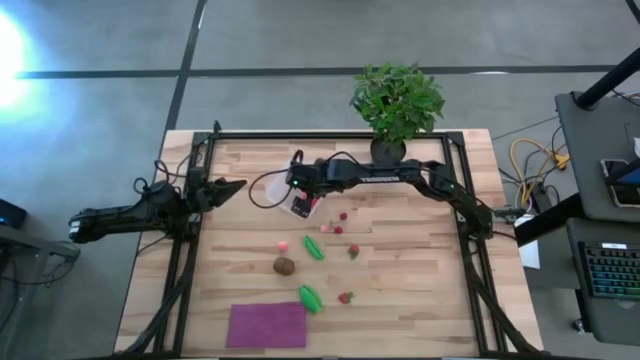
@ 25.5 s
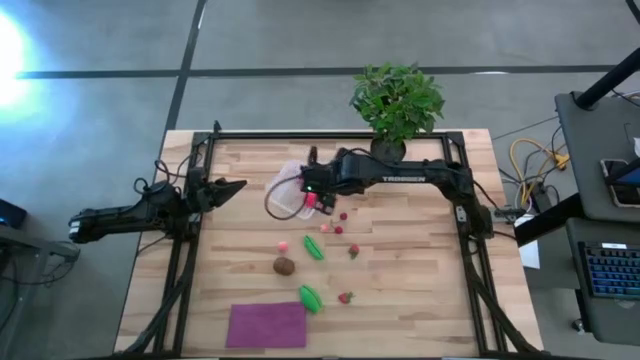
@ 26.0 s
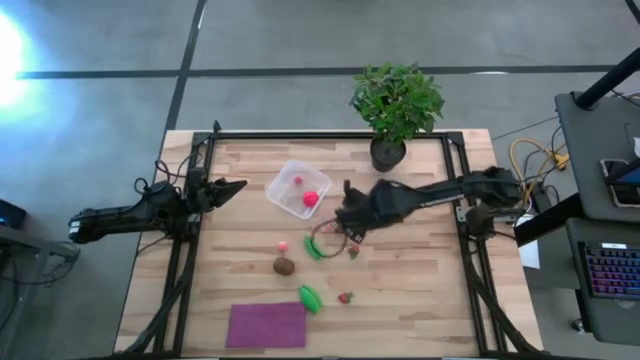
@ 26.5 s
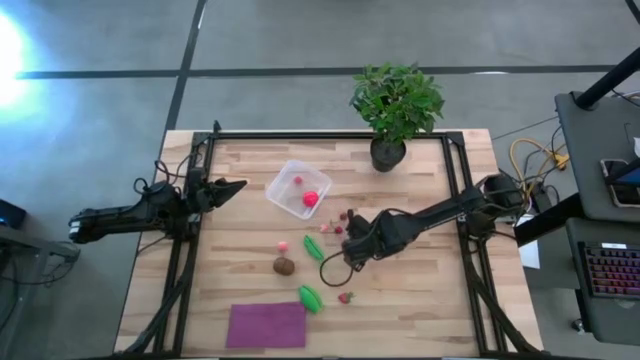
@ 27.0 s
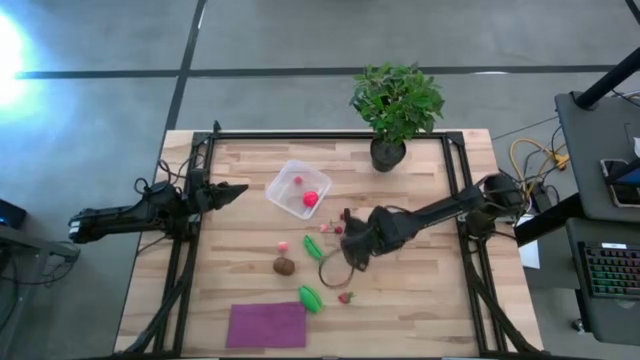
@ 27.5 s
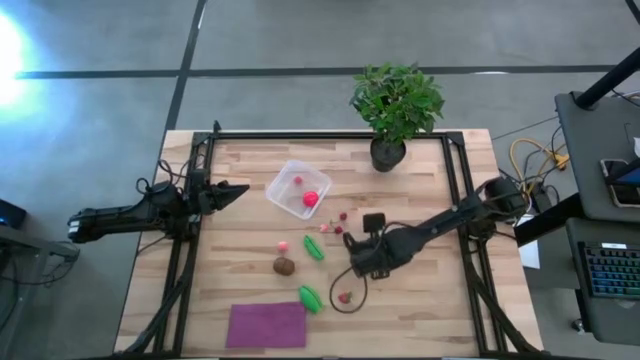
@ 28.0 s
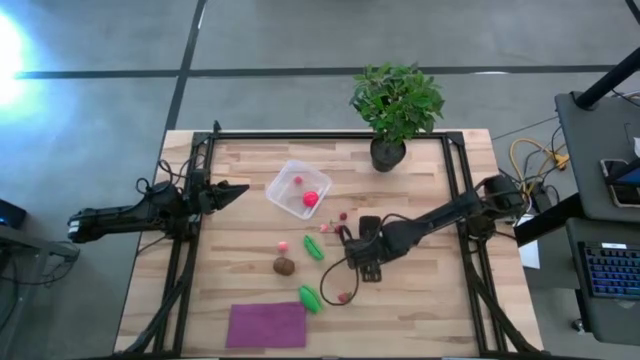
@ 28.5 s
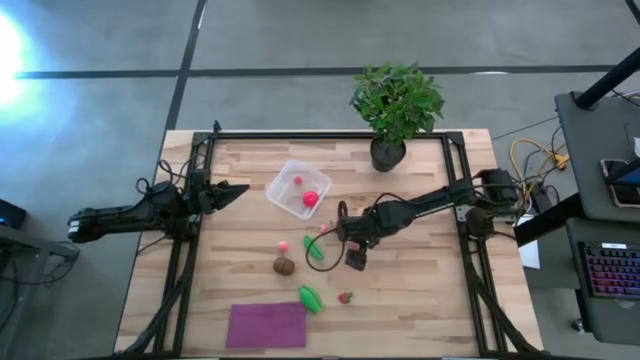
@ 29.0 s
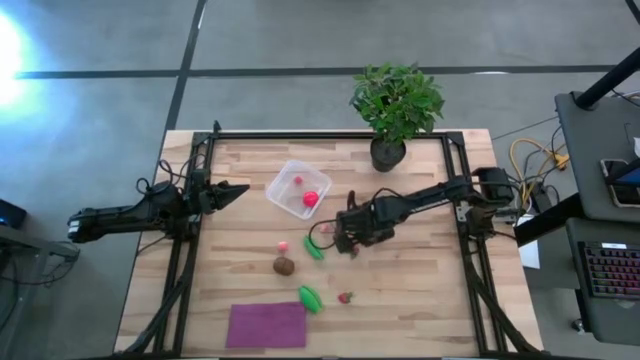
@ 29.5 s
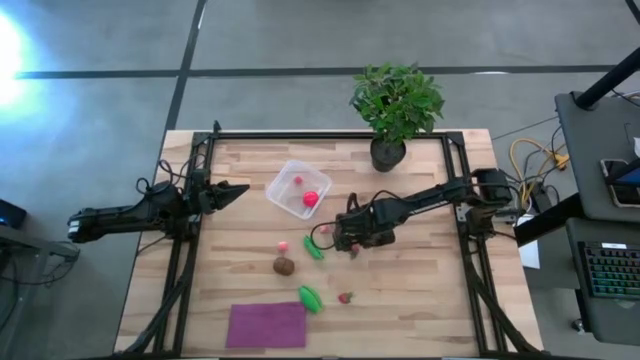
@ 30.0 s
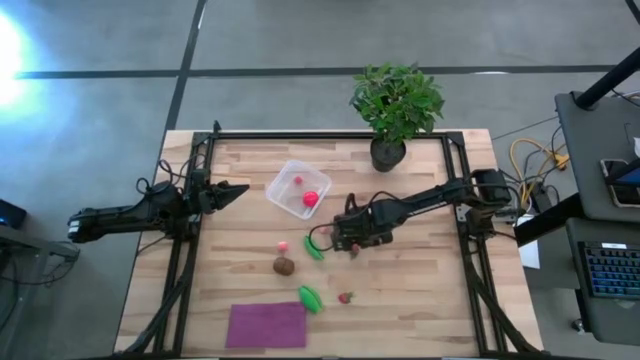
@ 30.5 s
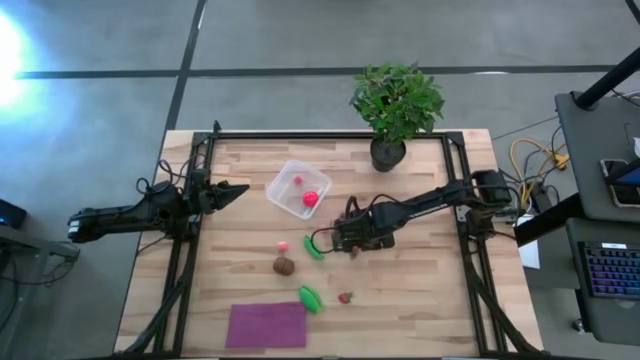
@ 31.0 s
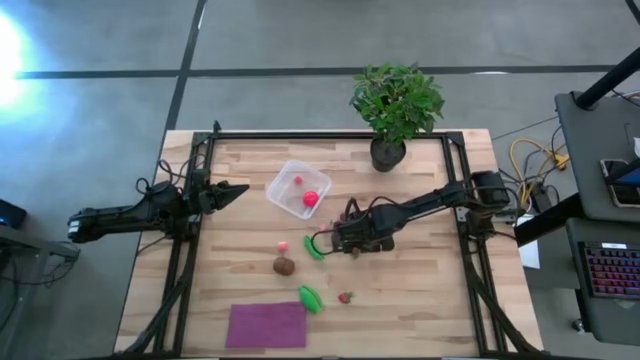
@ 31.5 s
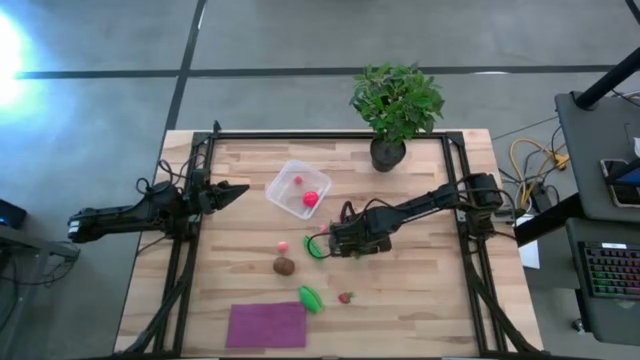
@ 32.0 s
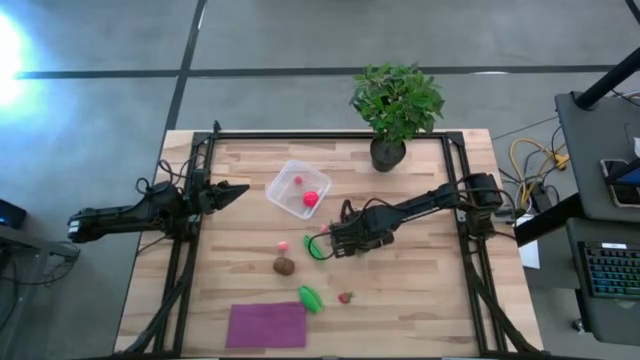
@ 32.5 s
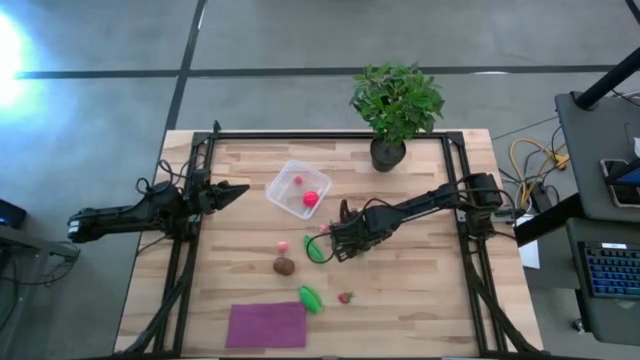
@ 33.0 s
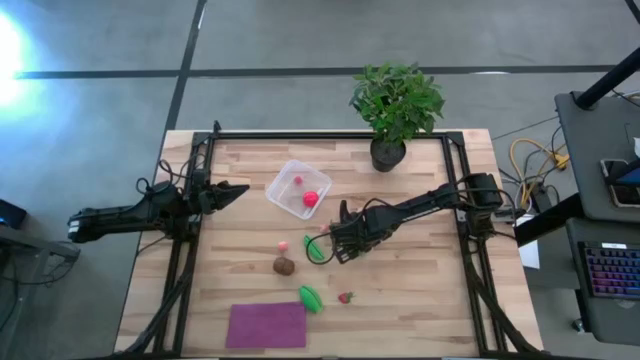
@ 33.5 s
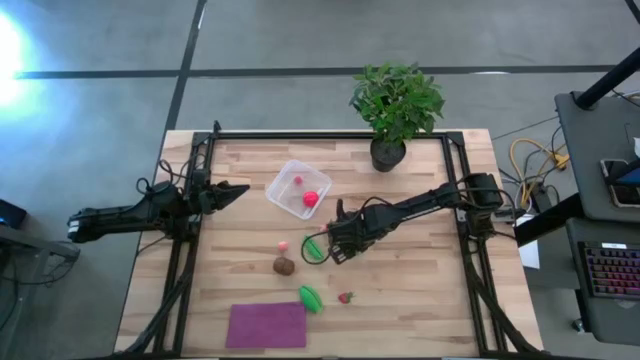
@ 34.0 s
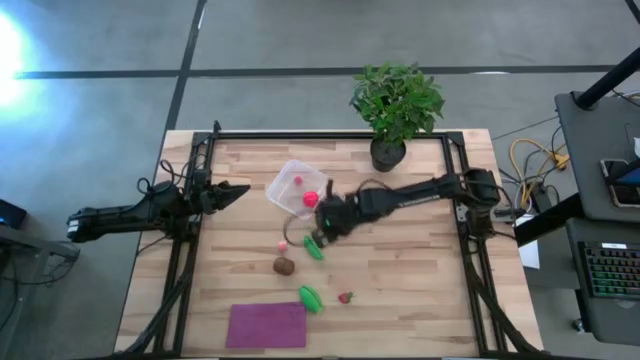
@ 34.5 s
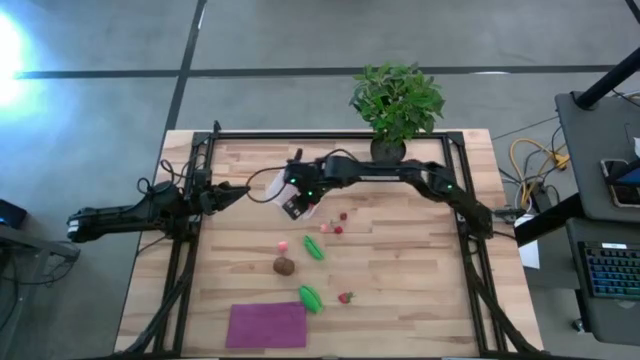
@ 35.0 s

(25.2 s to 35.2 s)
Task: Pick and placing Produce into tupperware
Put the top strawberry into the transparent bin

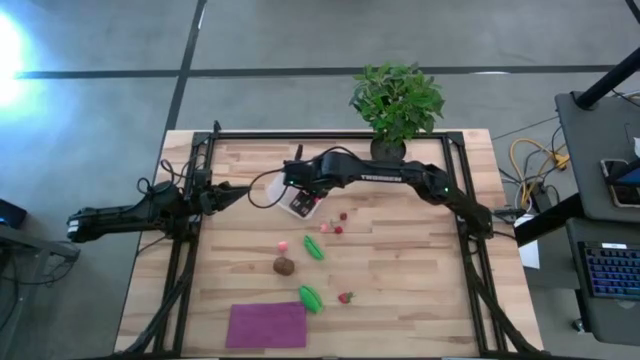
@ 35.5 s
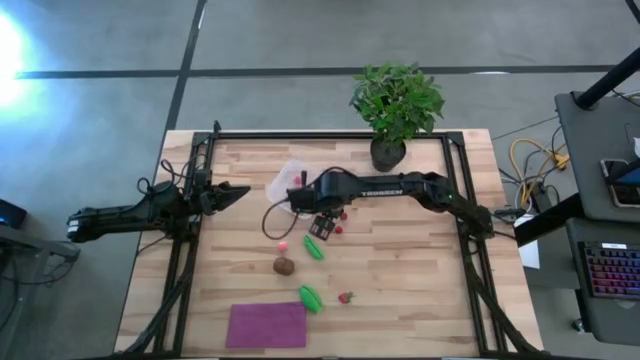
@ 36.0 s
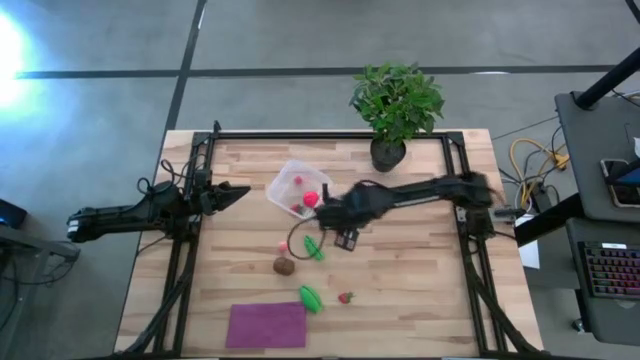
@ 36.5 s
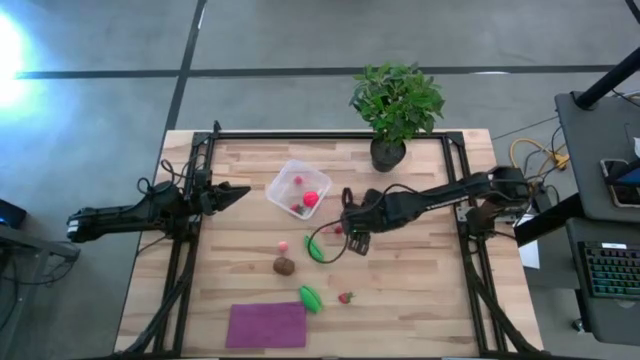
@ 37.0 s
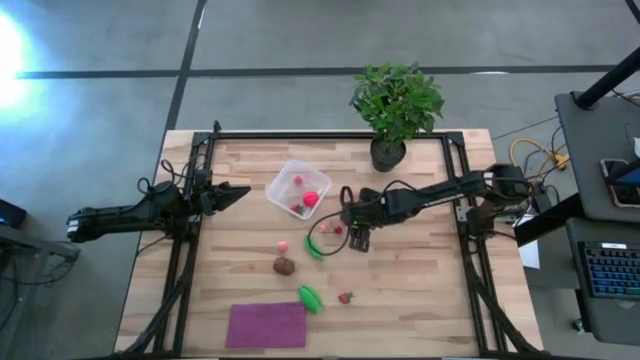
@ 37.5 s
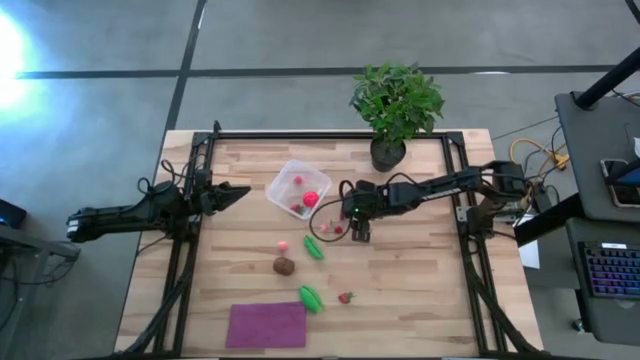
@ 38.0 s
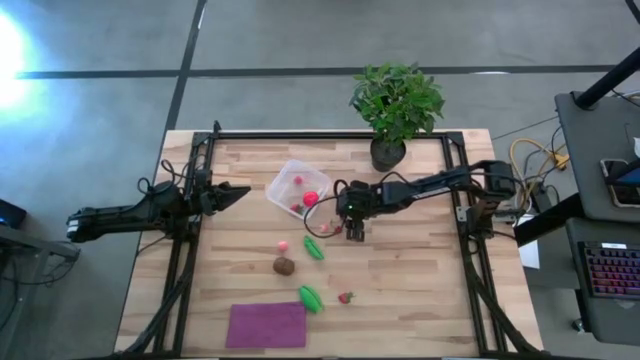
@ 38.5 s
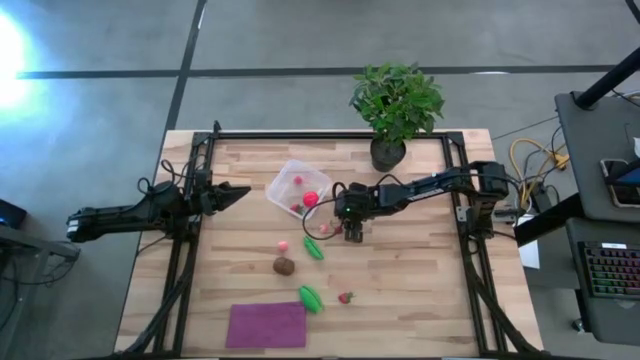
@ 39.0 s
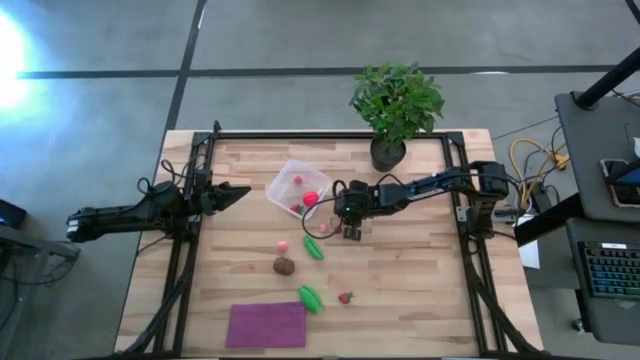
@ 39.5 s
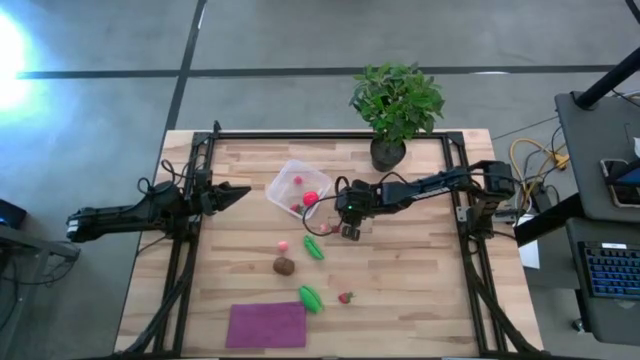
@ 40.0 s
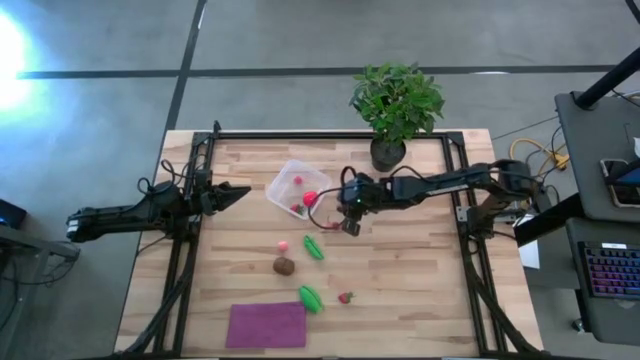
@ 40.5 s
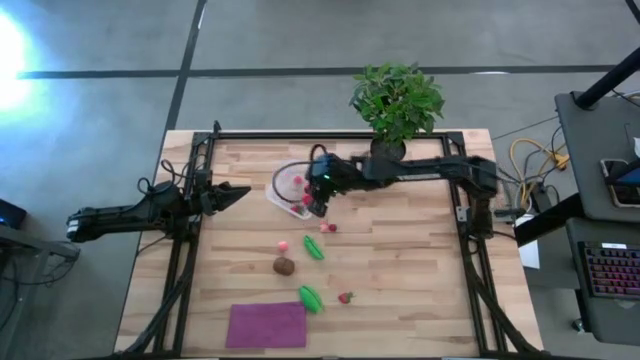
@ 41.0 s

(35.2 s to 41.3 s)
Put the top cherry into the transparent bin

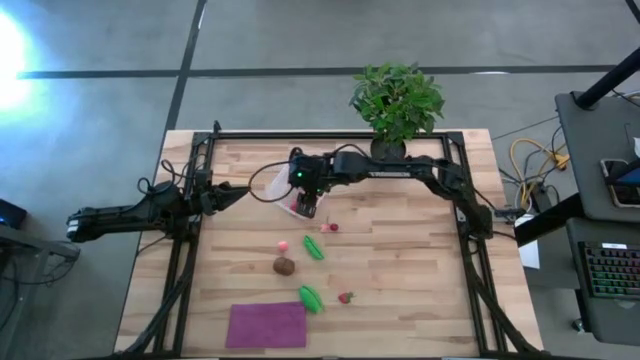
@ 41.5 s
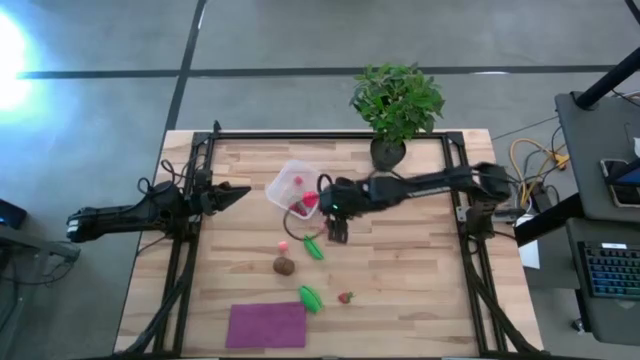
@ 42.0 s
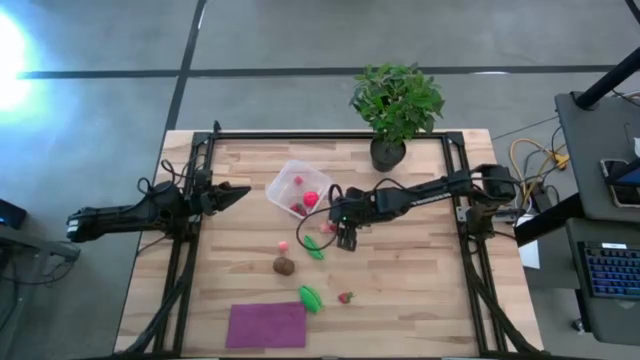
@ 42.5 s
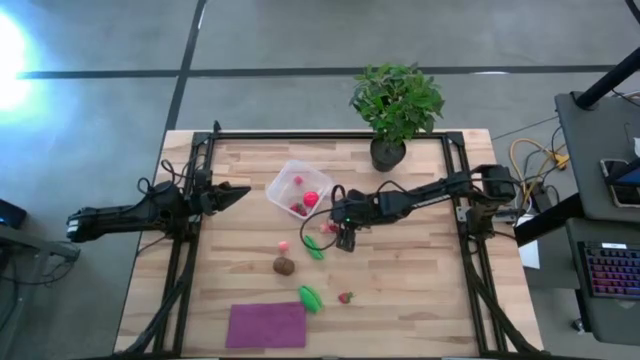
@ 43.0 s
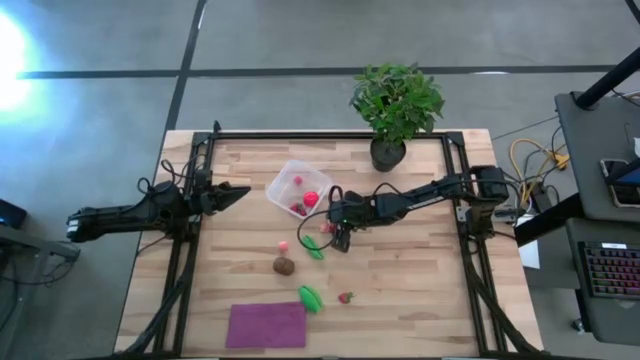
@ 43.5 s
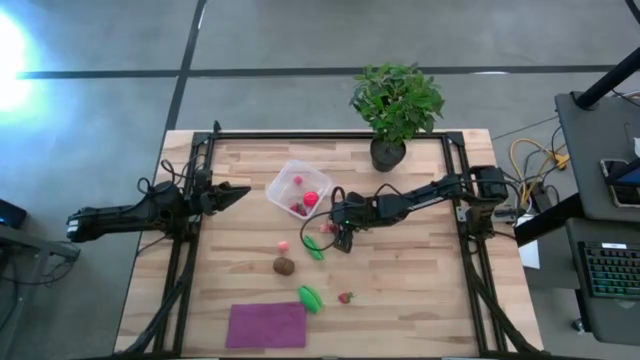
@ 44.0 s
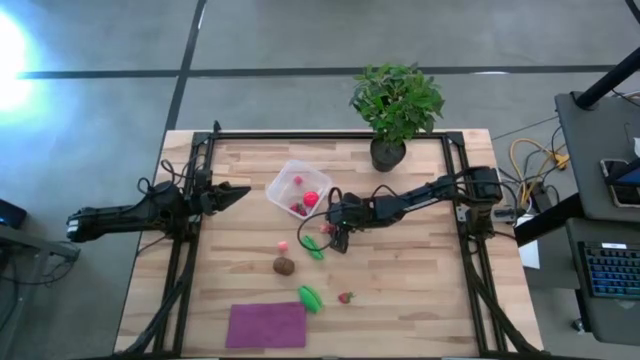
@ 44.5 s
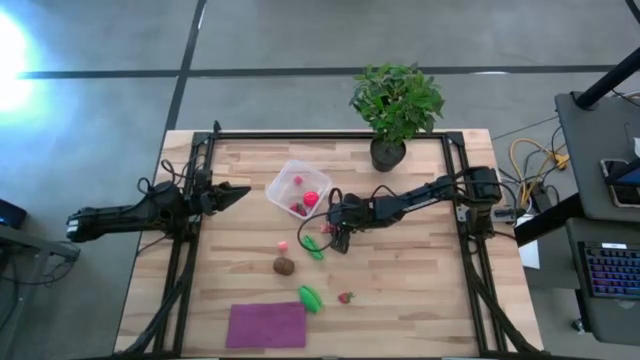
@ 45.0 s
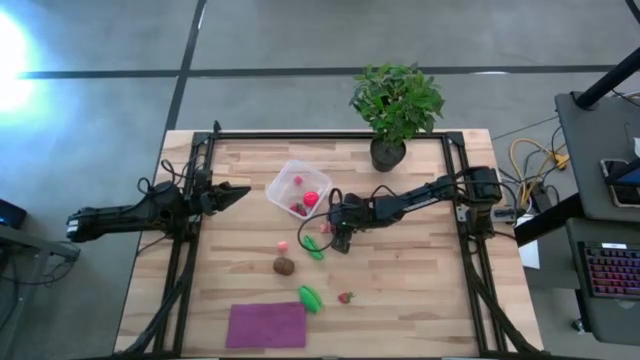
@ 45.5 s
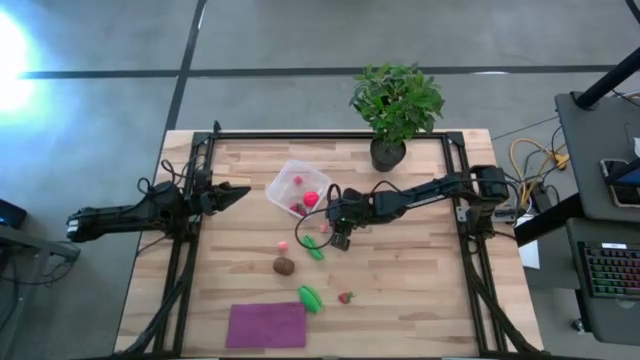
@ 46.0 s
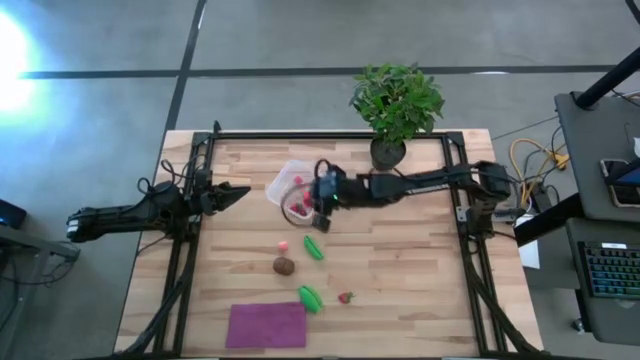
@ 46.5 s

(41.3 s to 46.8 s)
Put the cherry into the transparent bin
